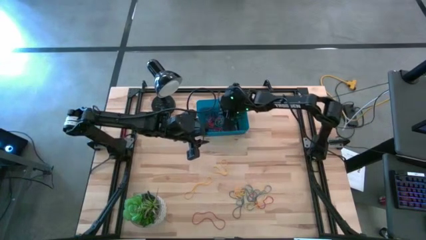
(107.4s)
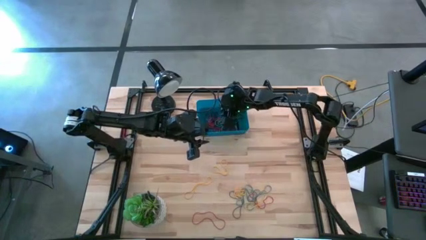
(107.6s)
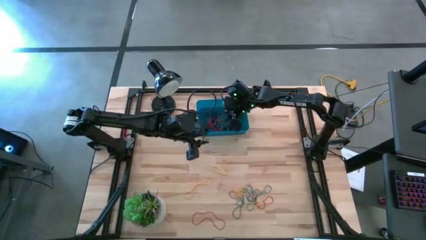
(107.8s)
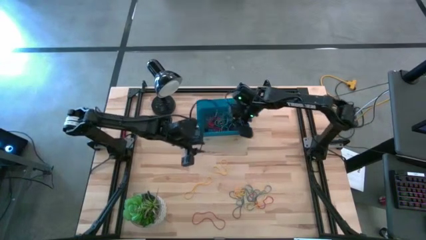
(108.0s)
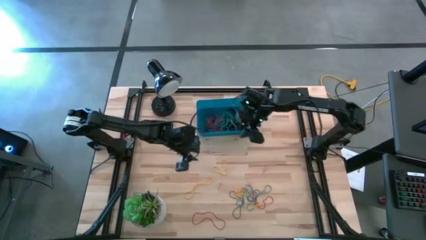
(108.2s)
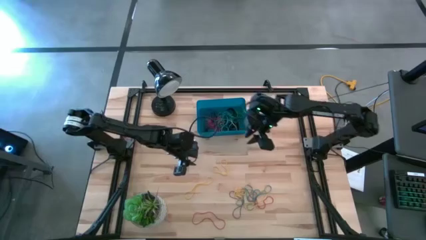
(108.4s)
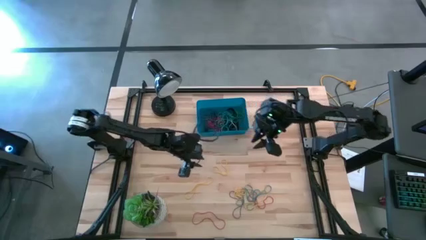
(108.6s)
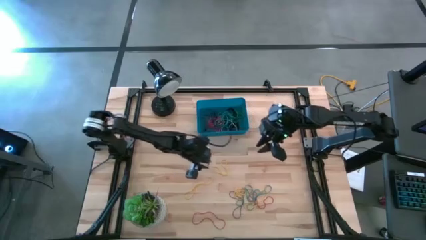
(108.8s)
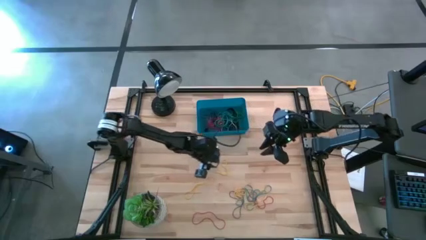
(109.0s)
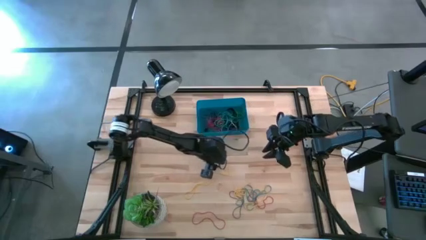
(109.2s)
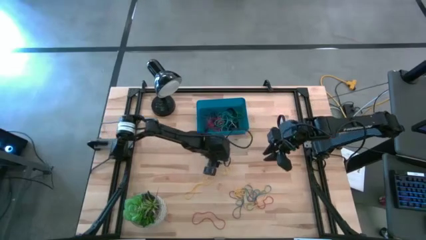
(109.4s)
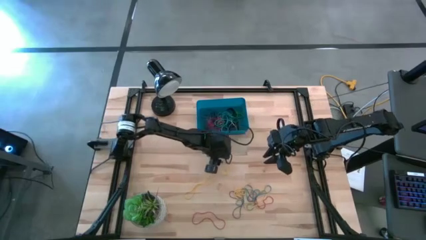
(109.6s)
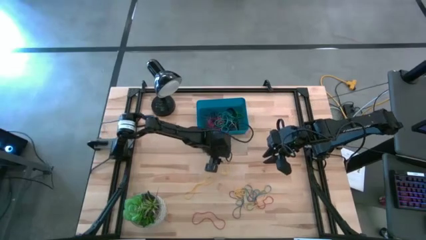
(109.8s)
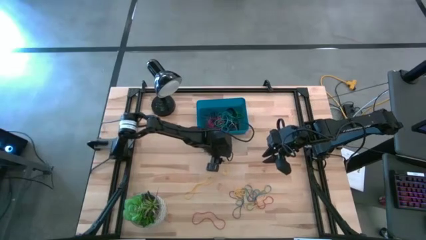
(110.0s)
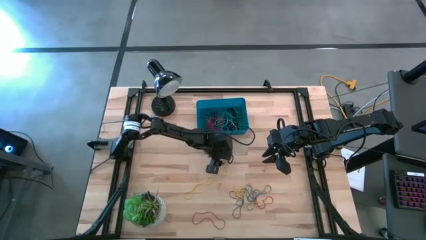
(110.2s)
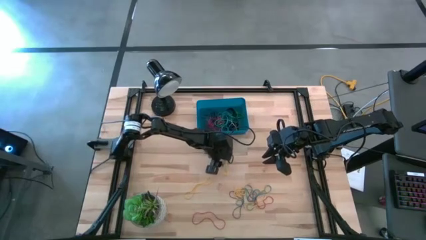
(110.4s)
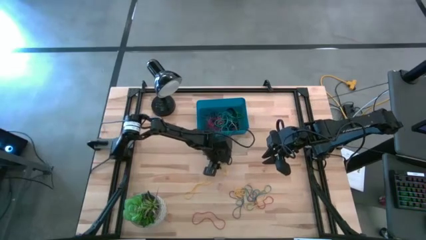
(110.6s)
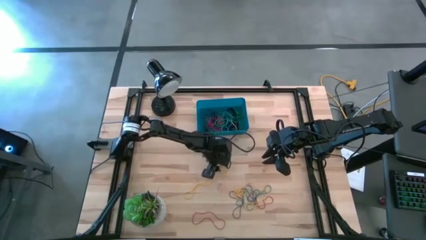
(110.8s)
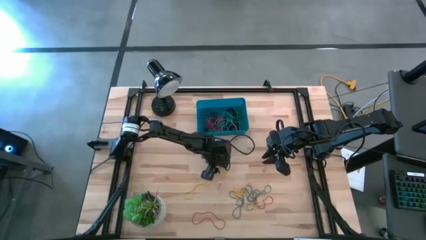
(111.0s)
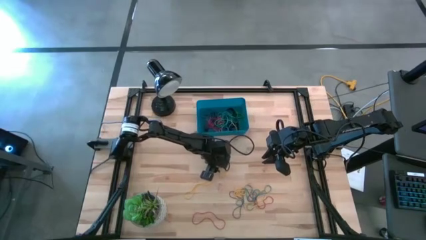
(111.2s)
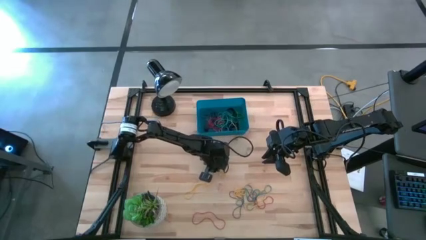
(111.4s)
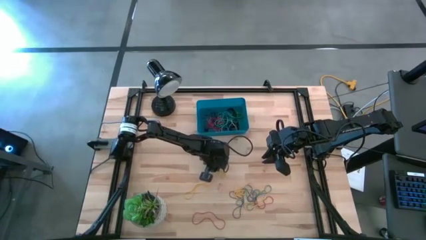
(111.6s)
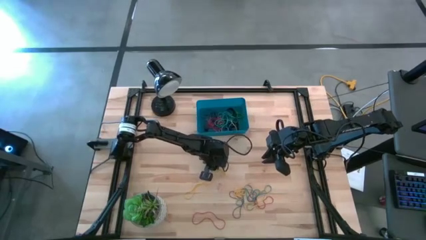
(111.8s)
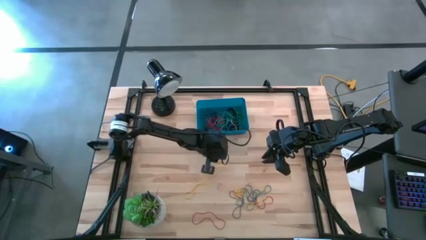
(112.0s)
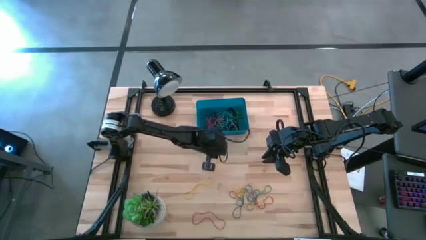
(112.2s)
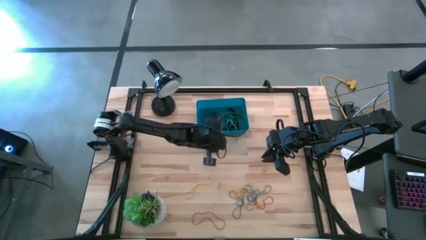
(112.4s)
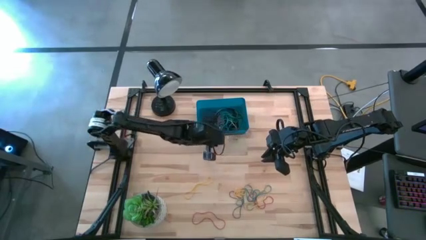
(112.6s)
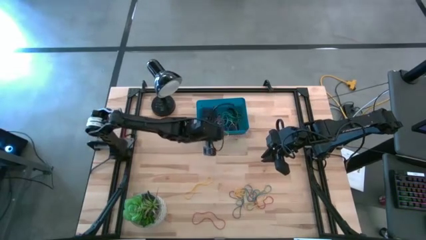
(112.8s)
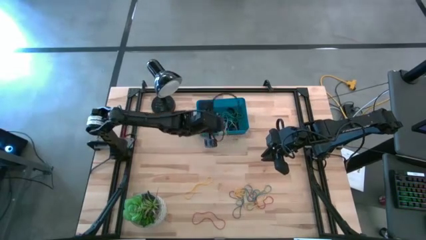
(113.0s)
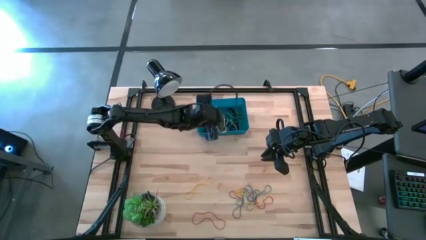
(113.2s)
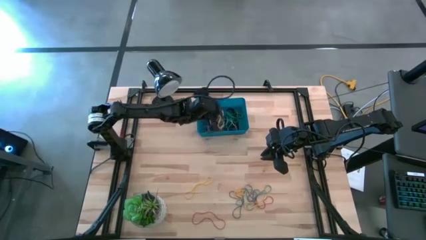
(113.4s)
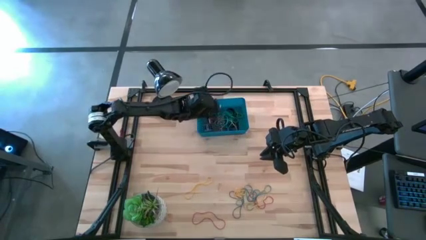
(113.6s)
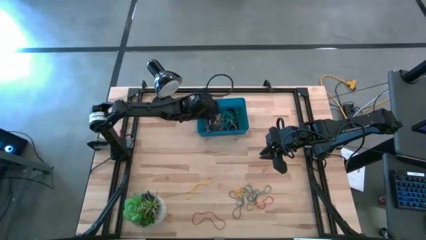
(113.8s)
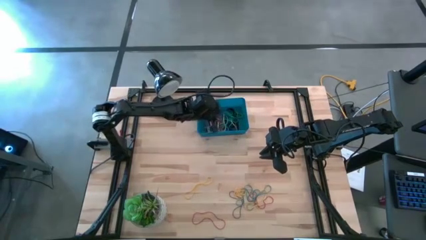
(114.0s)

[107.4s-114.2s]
Task: Pick and place rubber bands into bin
Put the yellow rubber band into the blue bin

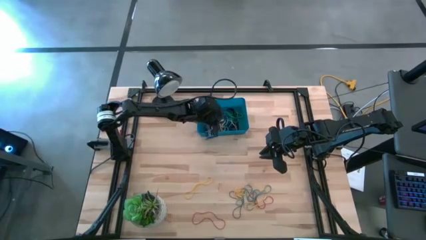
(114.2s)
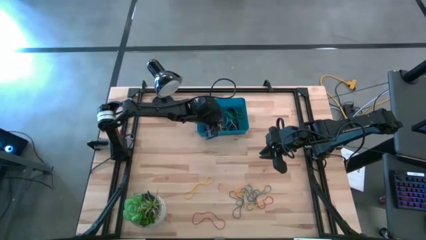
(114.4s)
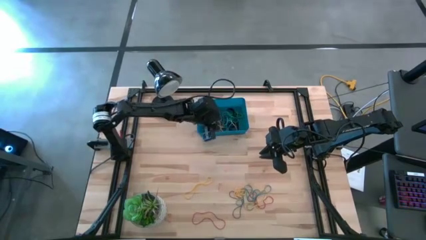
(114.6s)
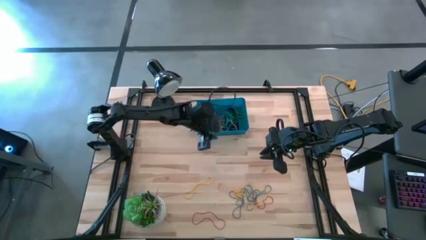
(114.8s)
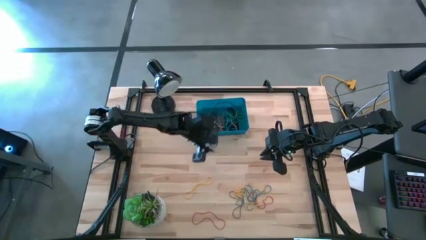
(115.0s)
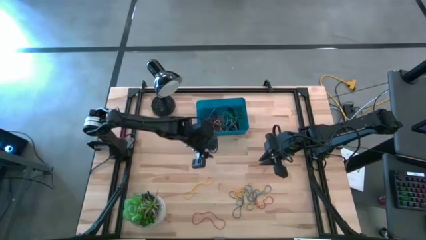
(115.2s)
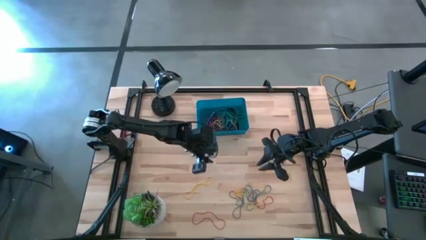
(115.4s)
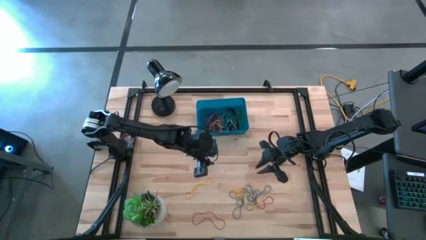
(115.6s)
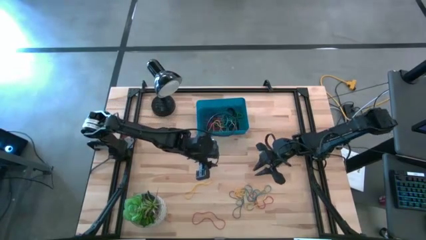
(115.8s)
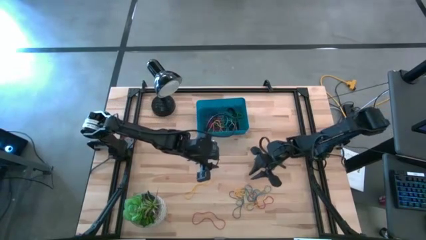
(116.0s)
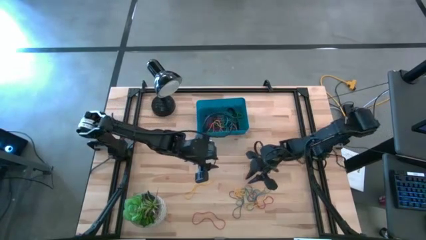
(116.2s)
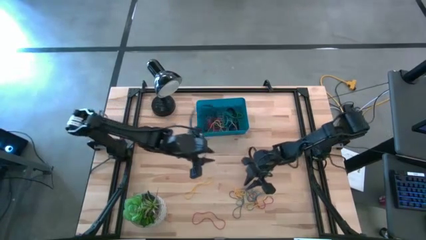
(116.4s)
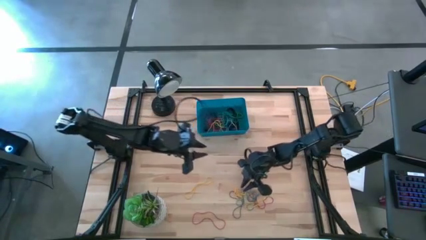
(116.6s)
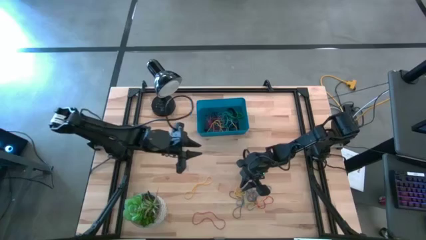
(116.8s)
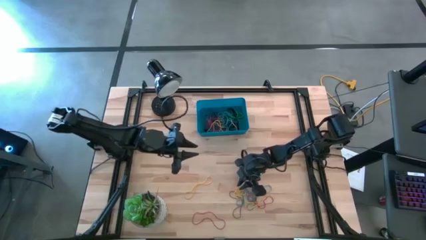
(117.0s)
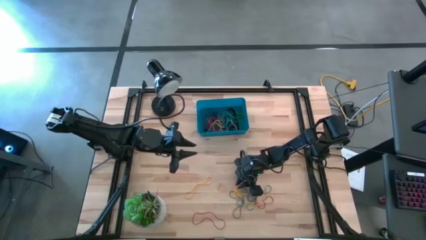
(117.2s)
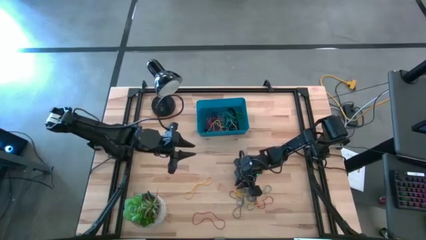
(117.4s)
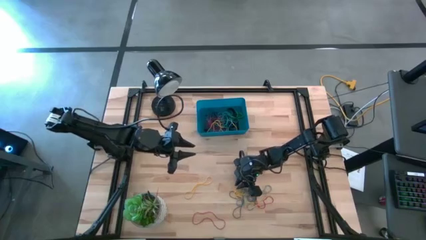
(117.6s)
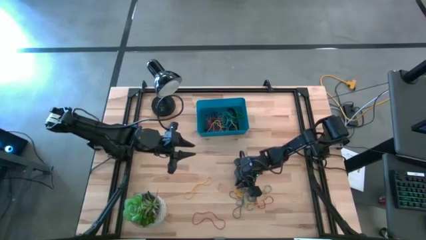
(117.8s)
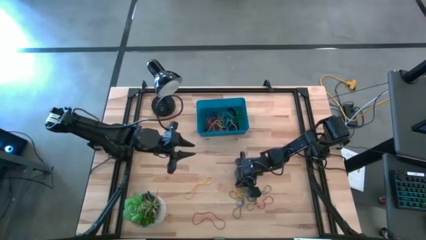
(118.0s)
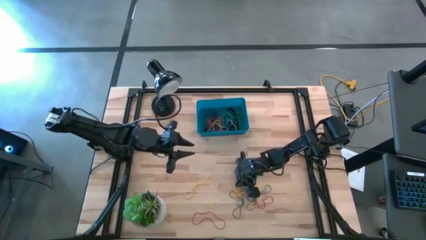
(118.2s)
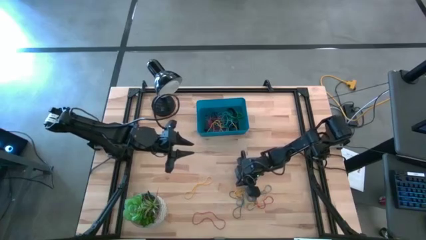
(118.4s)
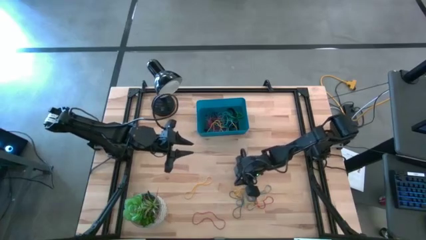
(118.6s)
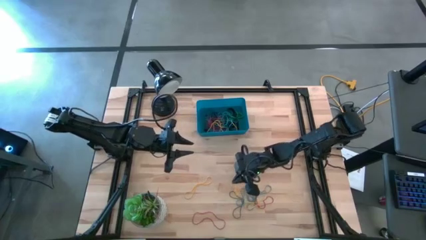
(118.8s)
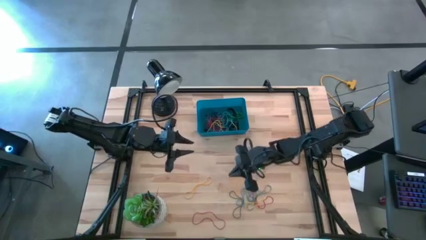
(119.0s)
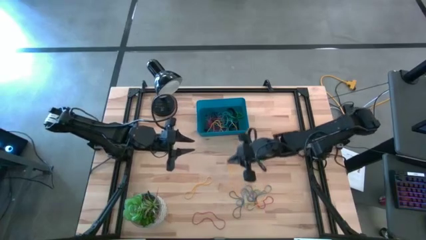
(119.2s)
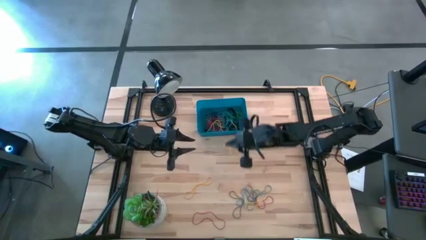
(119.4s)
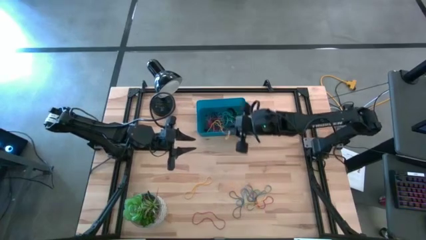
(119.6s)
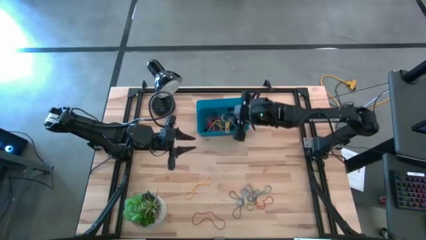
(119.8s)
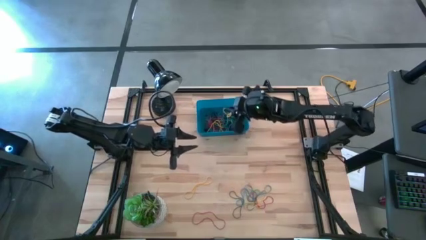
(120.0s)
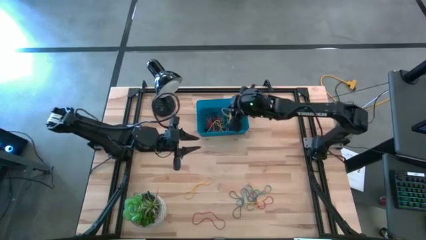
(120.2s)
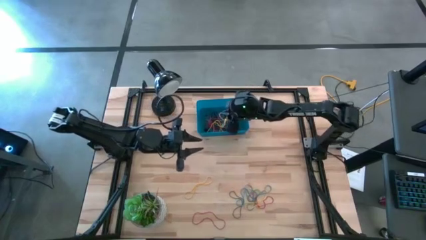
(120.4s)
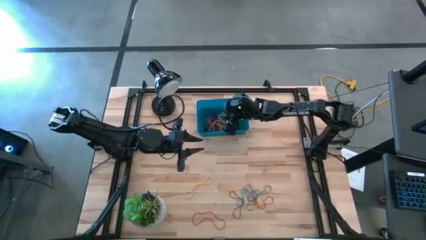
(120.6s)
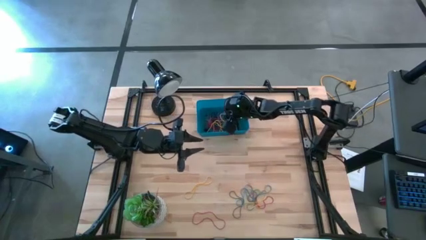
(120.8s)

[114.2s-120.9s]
Put the yellow rubber band into the blue bin

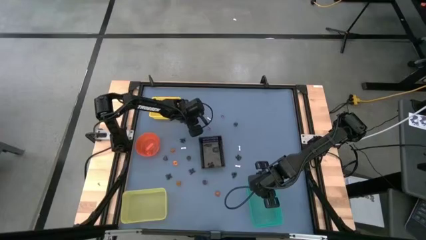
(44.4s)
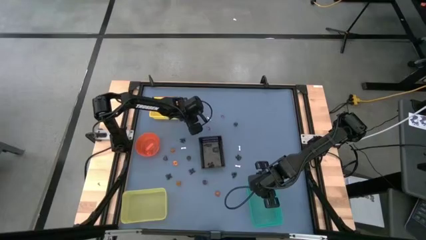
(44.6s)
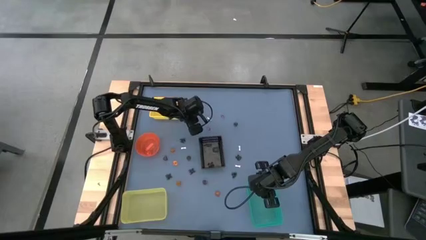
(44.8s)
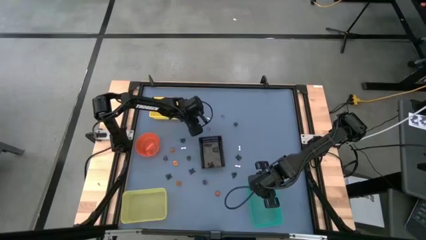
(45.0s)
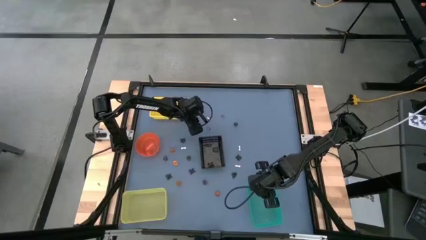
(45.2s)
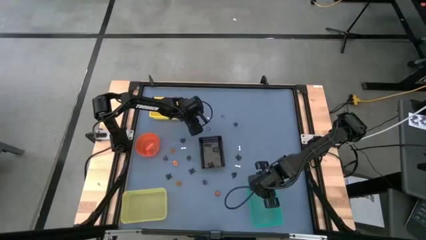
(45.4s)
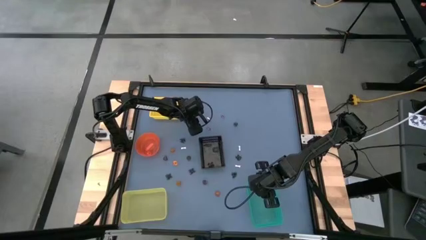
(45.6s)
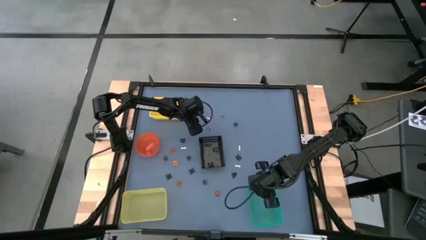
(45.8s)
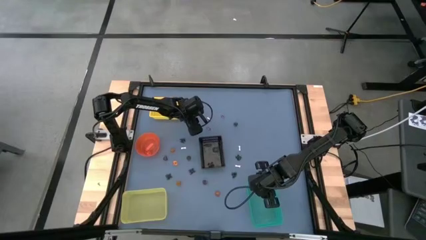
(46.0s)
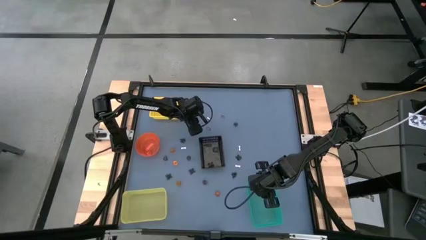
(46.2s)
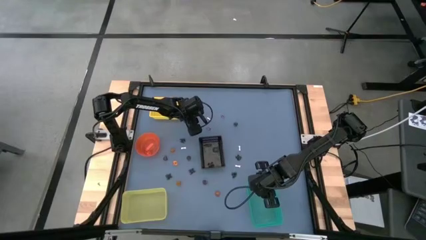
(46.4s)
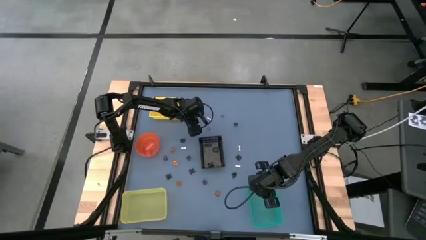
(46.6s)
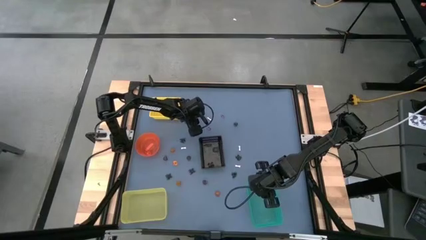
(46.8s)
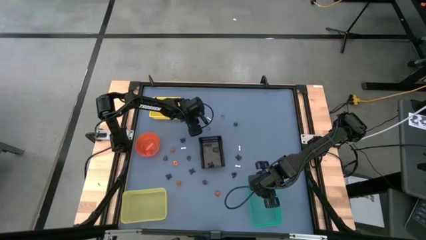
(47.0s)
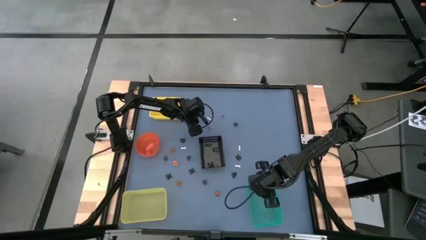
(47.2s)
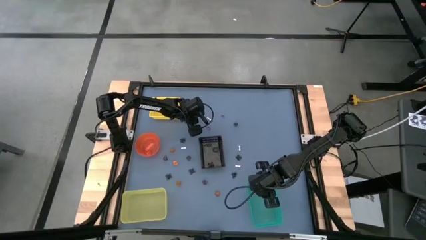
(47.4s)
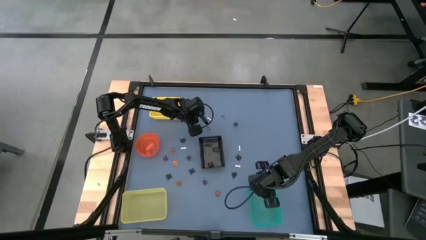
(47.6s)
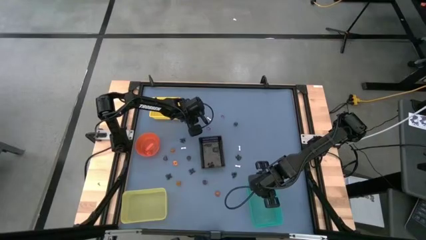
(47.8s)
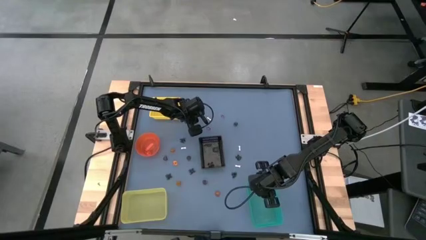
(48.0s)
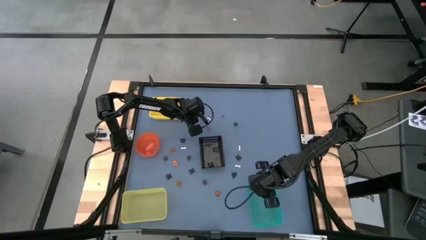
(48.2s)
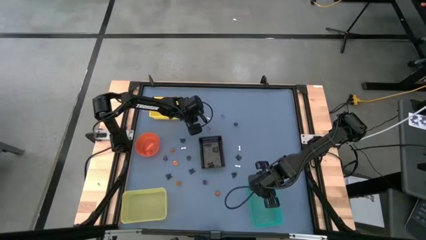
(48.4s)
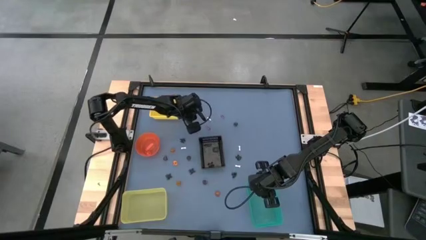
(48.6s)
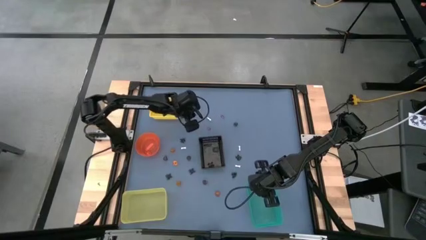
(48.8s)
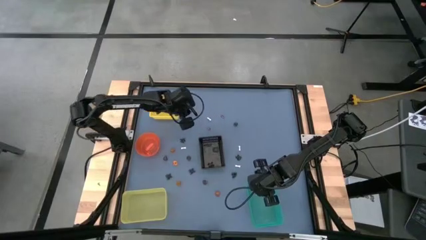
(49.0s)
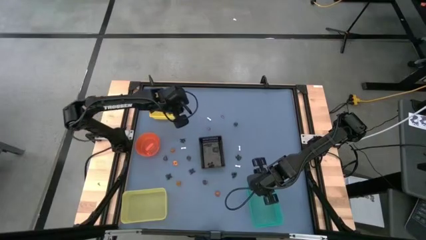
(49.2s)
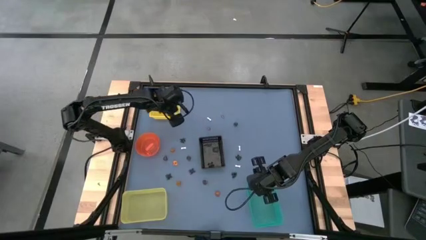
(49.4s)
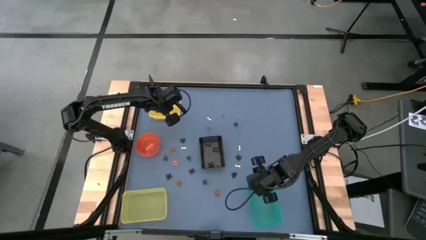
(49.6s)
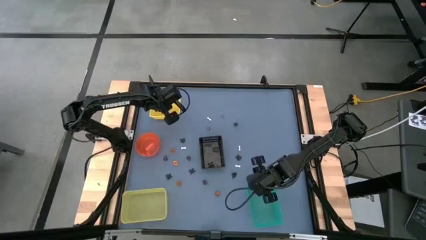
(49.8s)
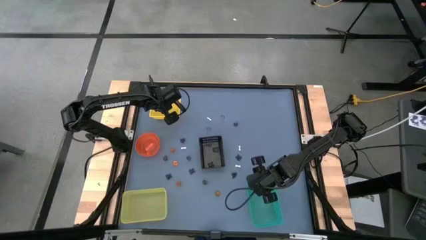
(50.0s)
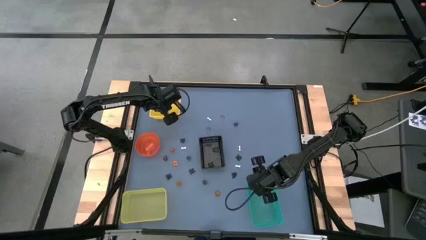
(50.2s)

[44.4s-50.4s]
Task: Sort Halloween decoration
Put the violet witch hat toy into the top yellow bin
